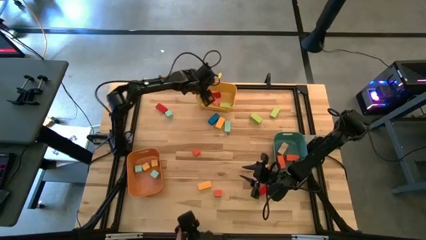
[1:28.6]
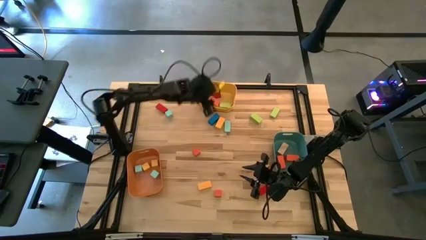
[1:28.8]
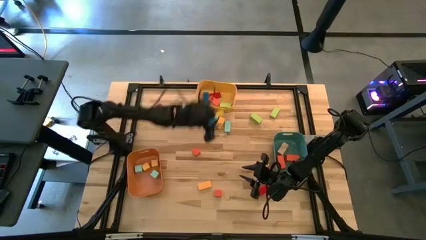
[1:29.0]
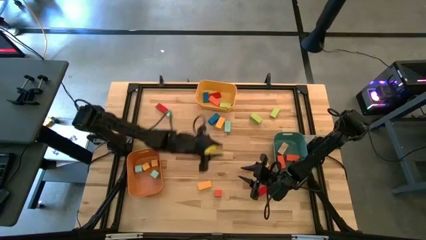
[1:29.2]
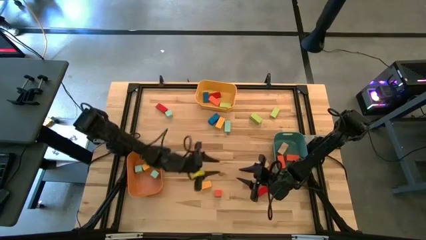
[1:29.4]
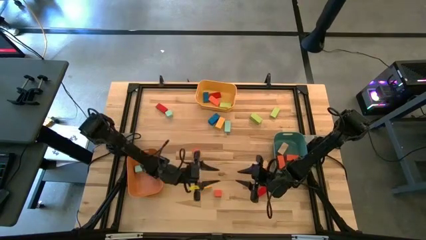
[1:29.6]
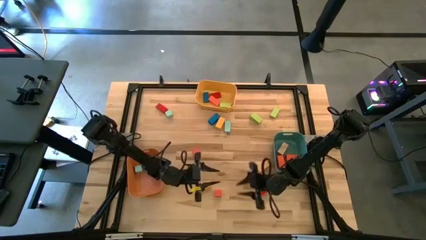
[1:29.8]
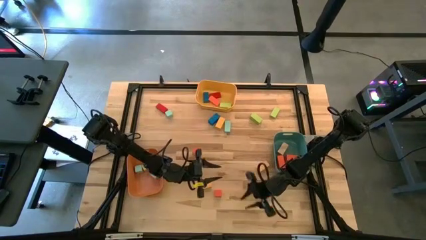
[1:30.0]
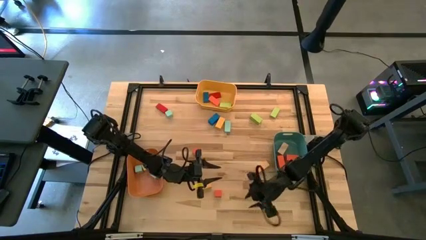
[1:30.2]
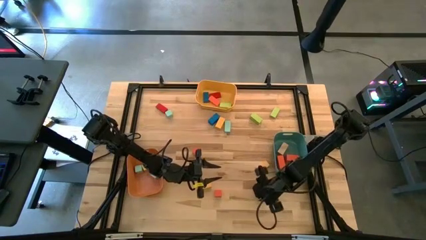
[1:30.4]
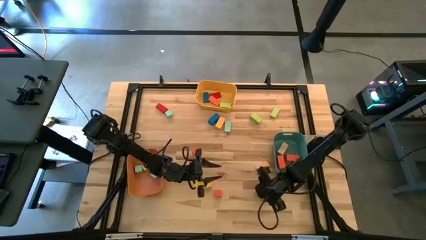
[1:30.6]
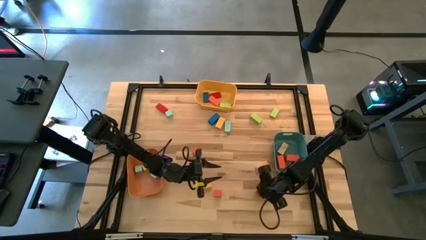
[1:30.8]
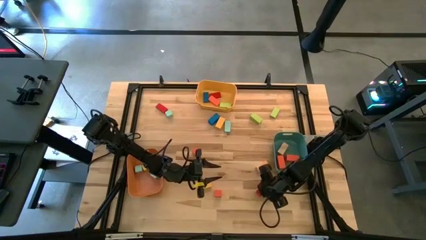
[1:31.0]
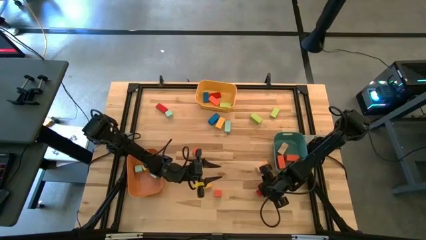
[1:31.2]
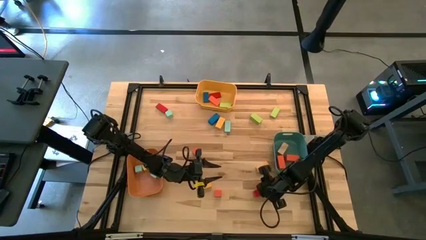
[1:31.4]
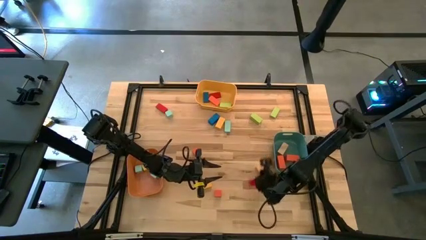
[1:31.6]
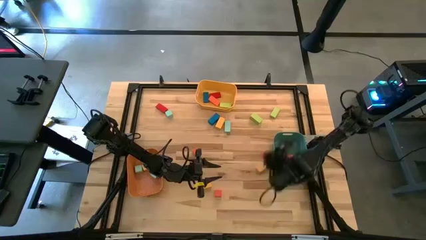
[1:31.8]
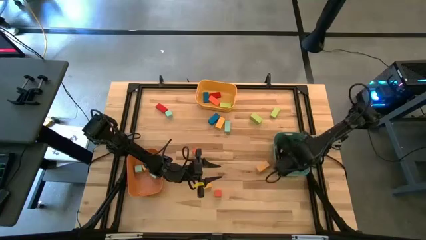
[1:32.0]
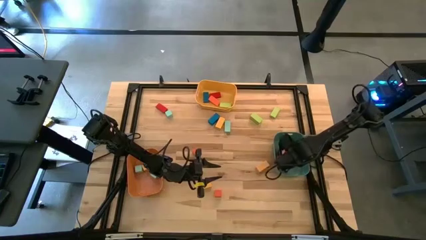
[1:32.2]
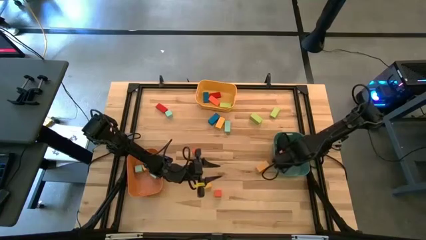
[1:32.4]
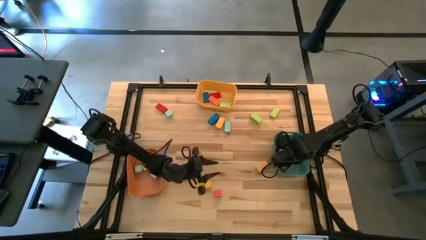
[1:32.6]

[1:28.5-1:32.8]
Task: Sort blocks by size
Put the thick red rectangular block into the green bin

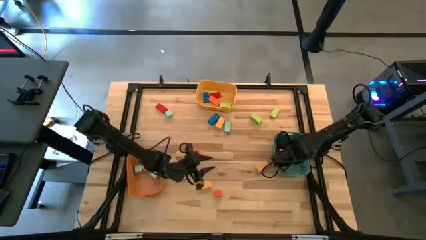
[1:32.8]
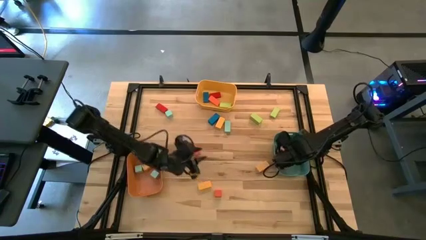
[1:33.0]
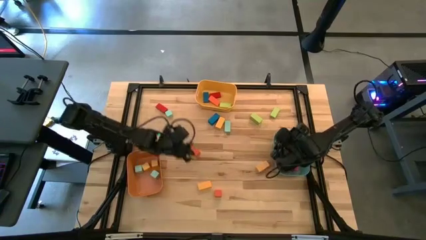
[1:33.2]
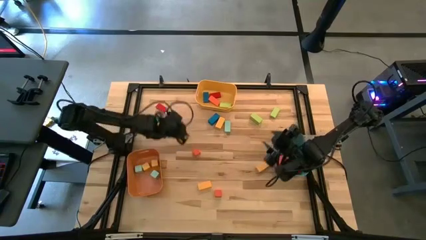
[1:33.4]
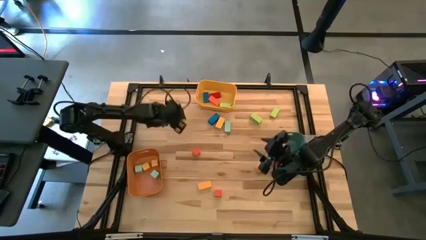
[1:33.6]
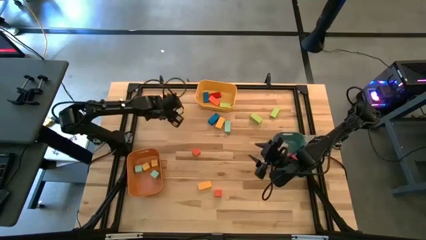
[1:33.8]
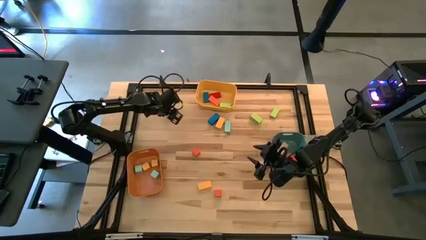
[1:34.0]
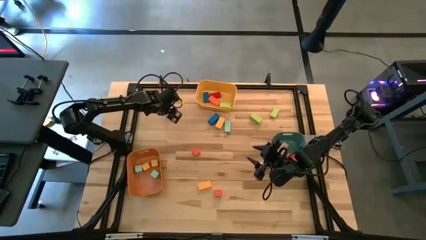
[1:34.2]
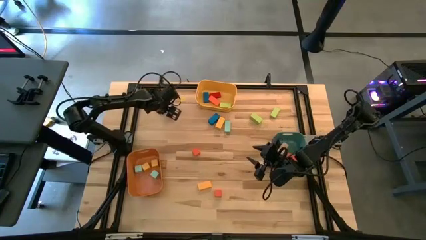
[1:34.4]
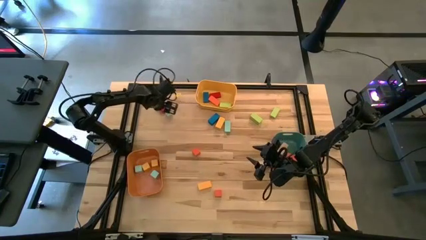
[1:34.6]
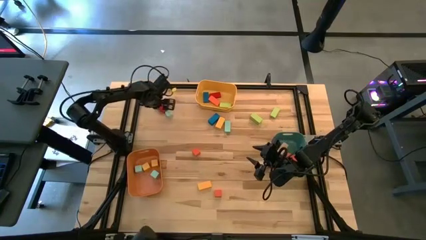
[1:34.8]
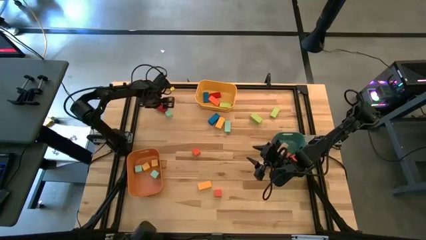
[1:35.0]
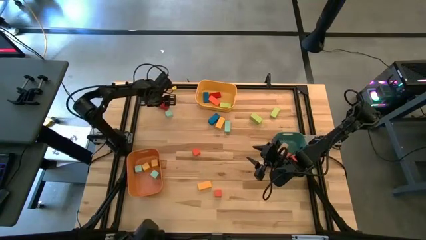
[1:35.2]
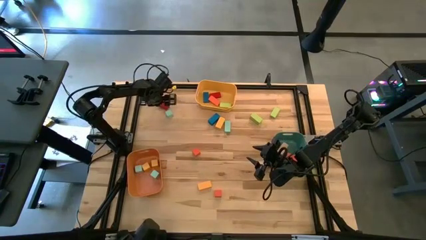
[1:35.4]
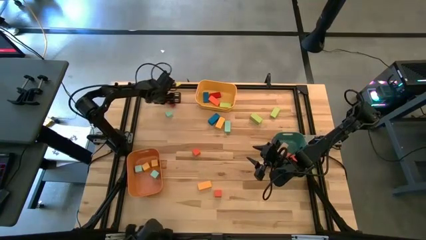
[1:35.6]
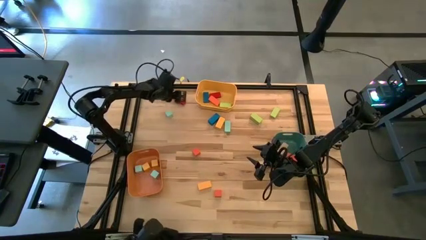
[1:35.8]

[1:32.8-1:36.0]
Put the thin red rectangular block into the yellow bin

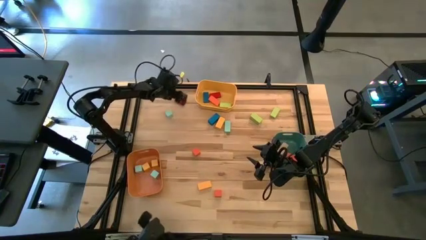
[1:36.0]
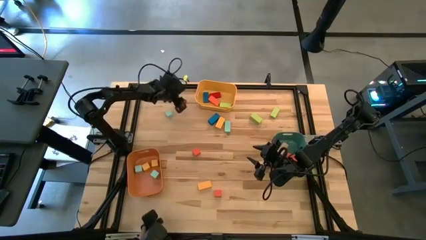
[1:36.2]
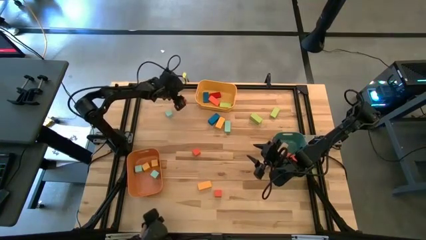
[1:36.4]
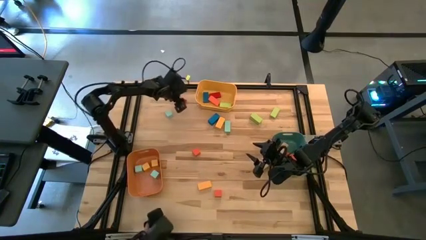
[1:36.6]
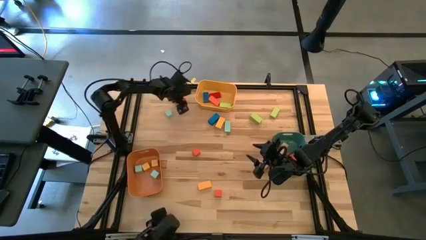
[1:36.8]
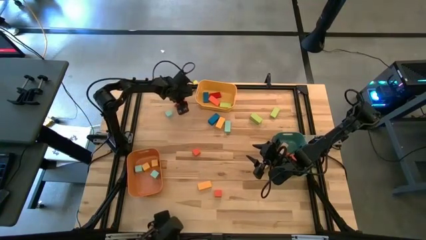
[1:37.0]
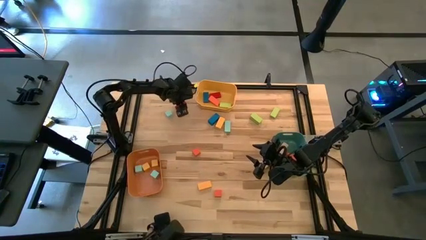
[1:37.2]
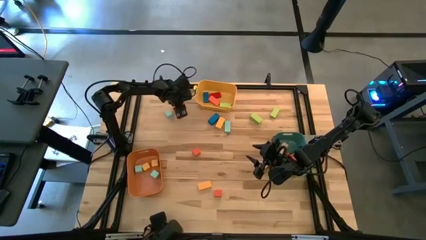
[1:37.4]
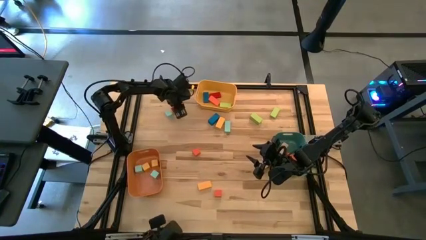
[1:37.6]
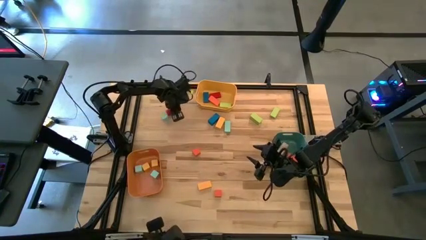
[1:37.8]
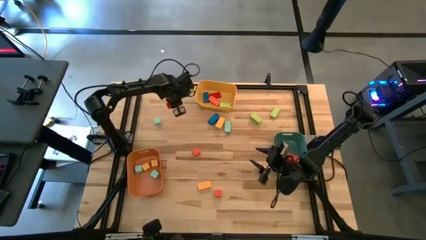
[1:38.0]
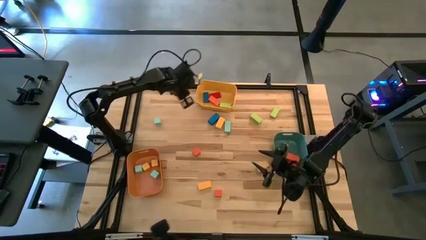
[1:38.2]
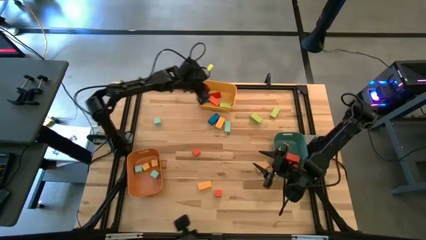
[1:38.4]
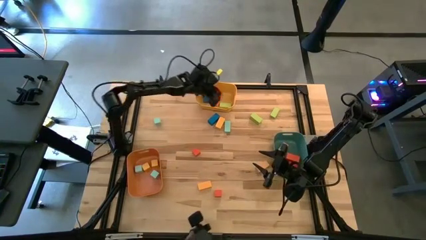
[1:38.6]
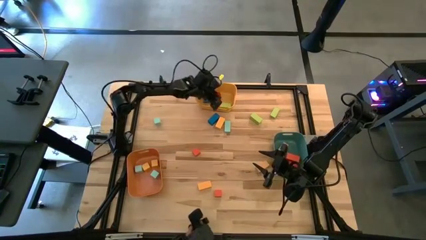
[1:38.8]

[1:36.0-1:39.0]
Put the thin red rectangular block into the yellow bin

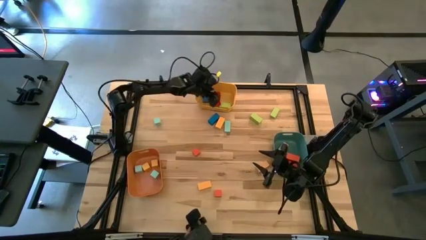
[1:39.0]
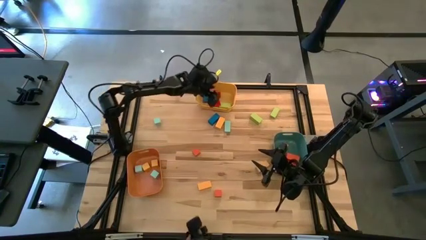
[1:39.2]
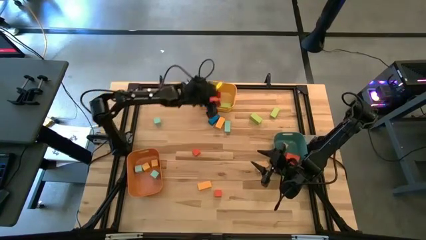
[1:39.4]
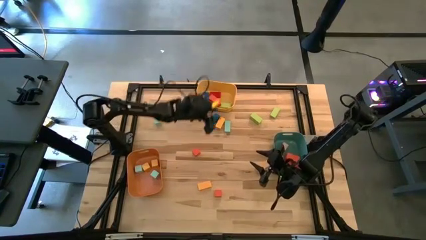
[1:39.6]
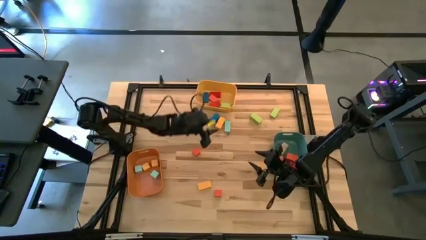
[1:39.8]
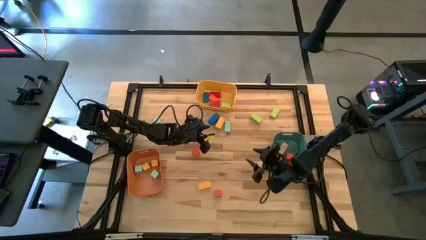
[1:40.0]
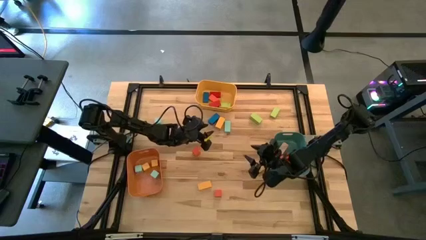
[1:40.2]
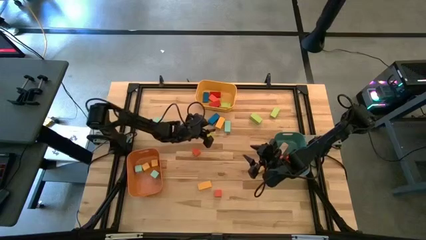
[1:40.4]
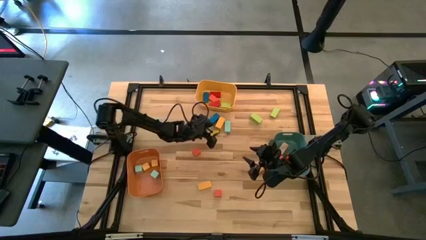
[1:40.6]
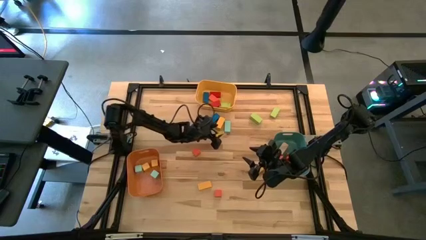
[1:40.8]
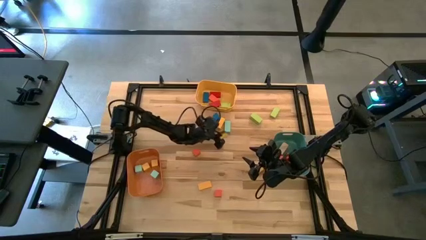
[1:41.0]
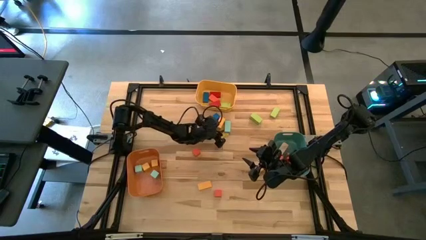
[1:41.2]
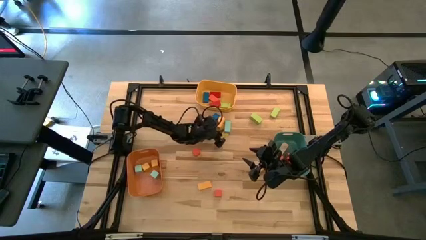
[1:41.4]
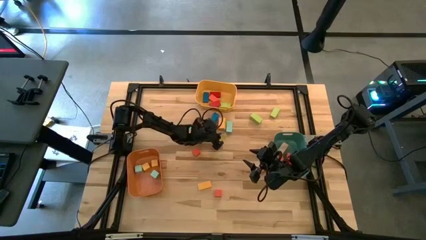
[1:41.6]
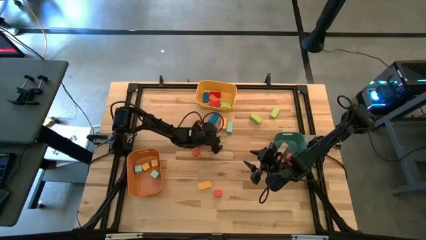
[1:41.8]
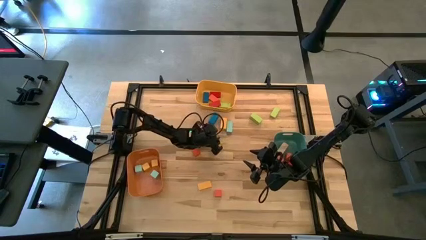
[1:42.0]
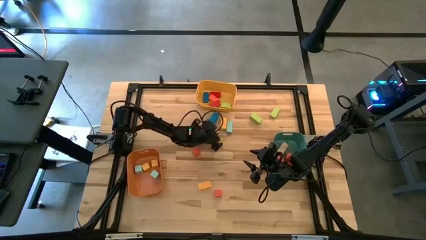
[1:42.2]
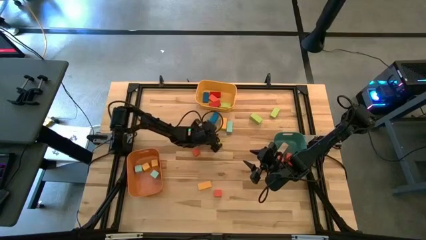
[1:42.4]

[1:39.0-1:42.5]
Put the thick yellow rectangular block into the green bin

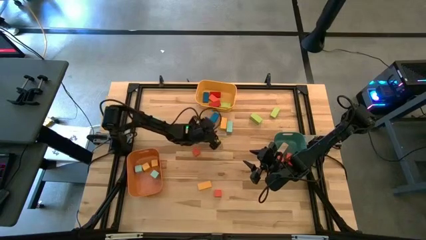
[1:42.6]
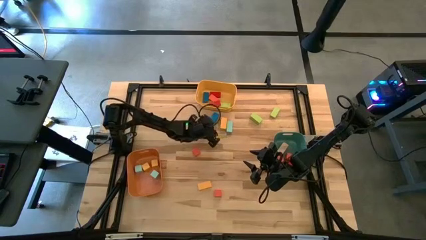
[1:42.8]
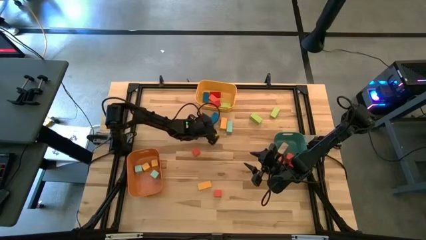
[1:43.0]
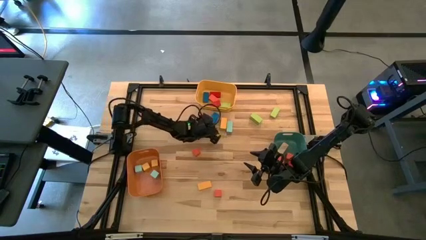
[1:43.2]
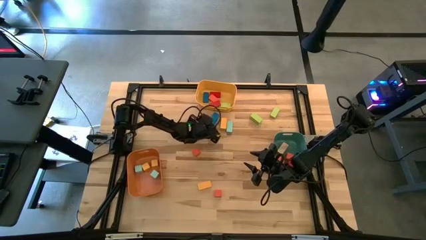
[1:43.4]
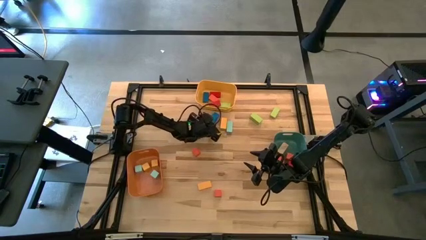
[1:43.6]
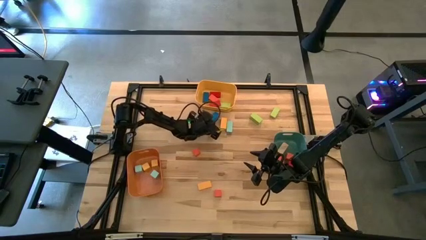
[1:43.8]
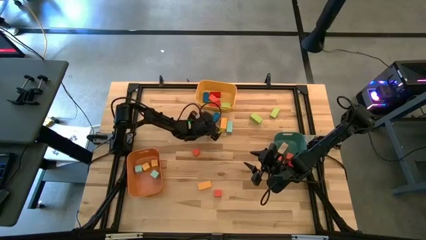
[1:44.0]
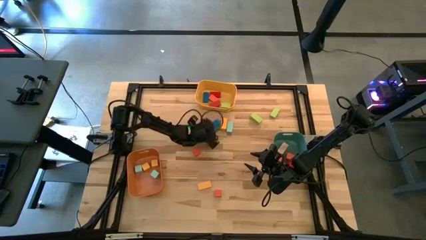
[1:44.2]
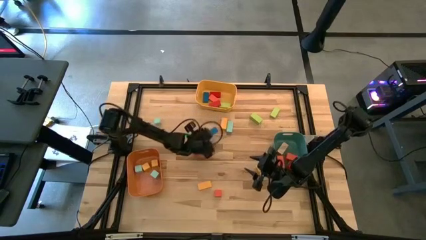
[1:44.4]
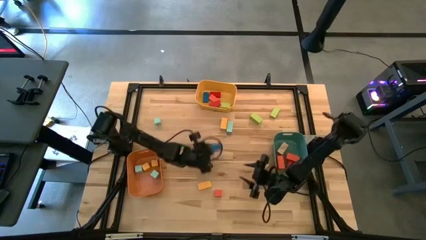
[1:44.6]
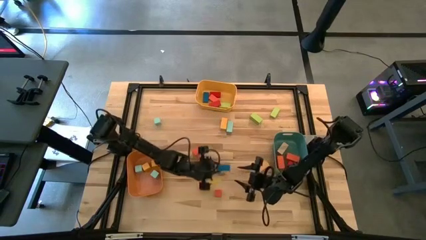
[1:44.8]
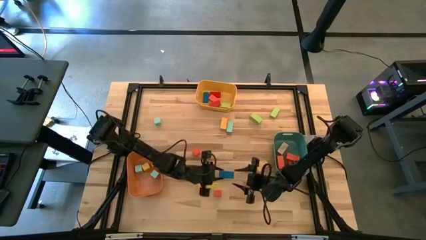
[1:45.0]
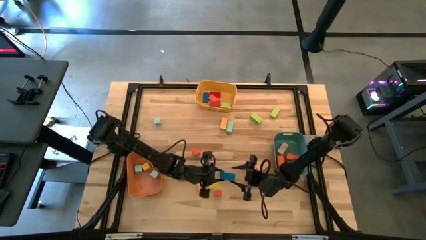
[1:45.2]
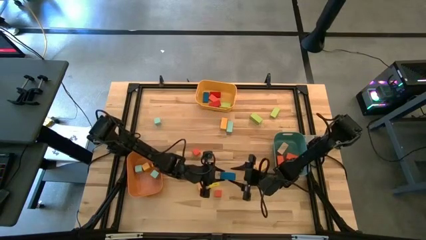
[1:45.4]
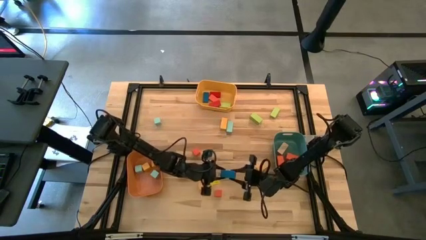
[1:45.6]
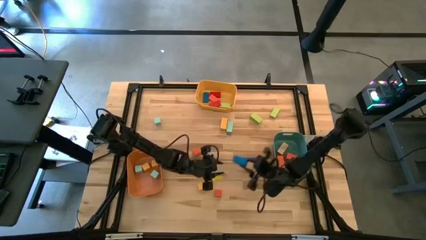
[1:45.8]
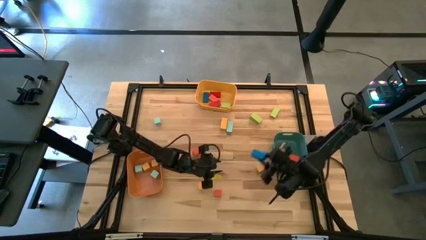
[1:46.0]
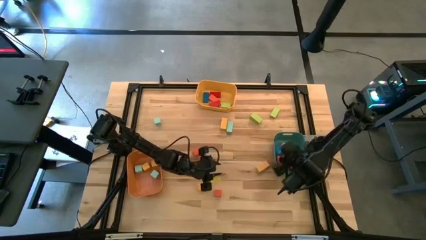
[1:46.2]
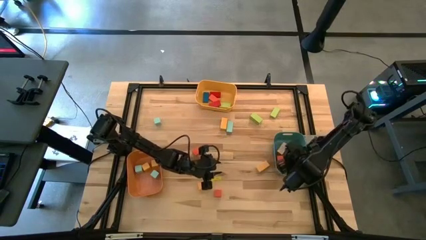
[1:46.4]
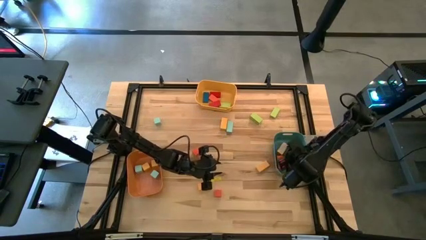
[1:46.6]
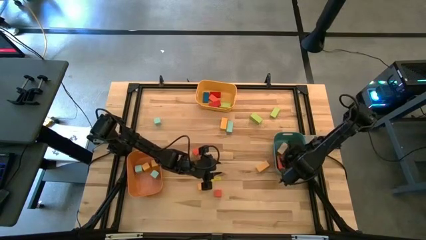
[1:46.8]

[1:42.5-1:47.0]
Put the thick blue rectangular block into the green bin
